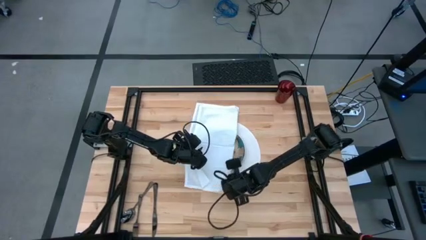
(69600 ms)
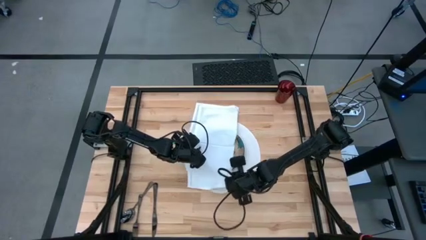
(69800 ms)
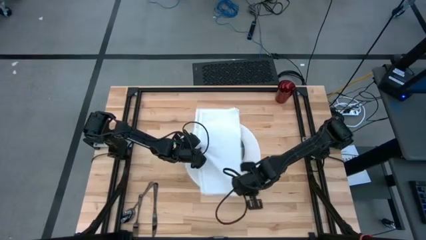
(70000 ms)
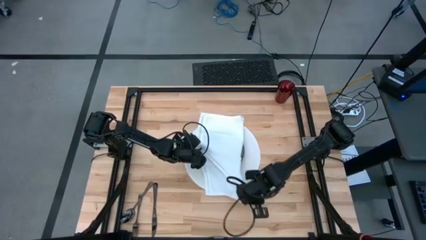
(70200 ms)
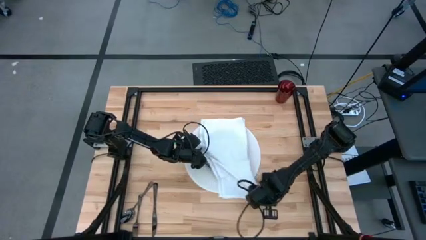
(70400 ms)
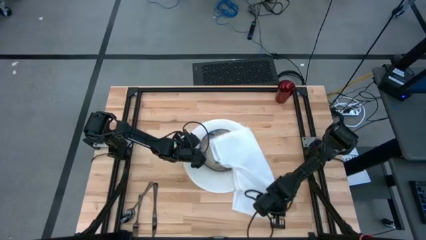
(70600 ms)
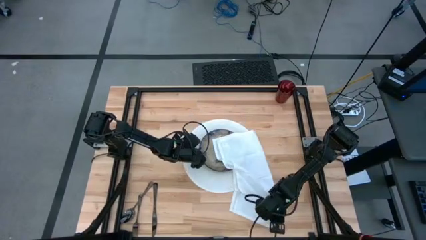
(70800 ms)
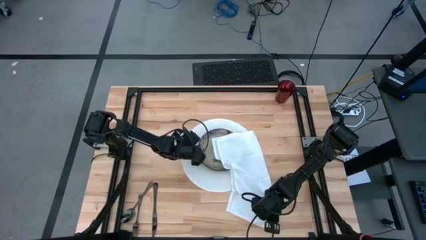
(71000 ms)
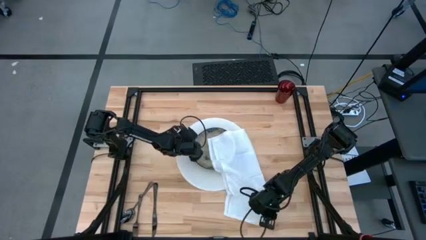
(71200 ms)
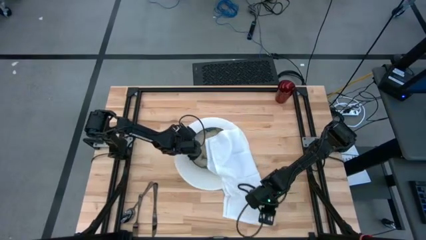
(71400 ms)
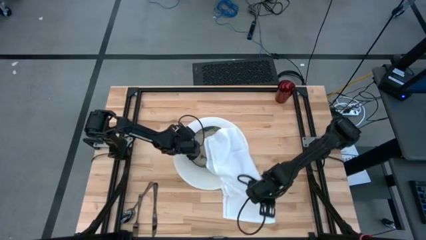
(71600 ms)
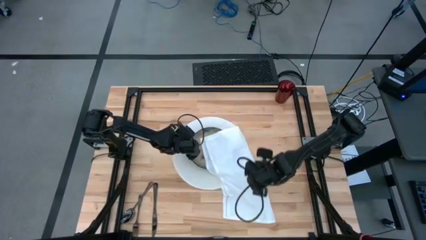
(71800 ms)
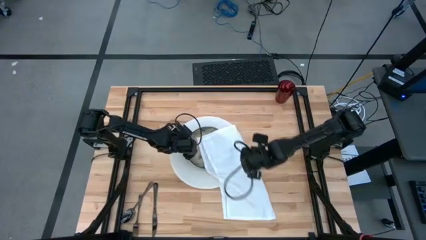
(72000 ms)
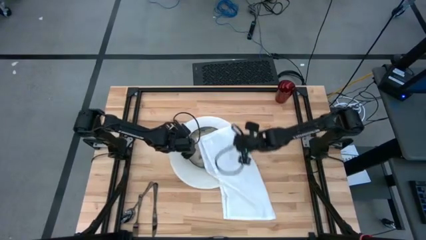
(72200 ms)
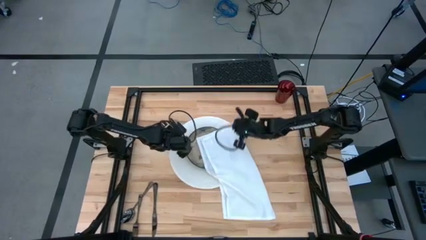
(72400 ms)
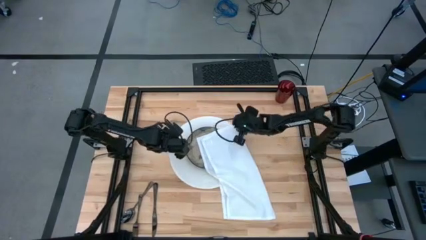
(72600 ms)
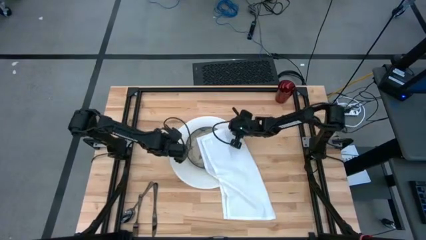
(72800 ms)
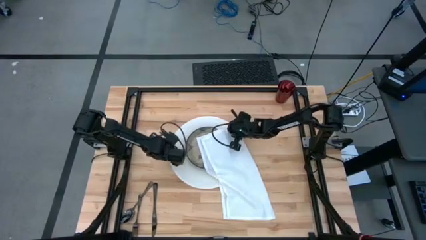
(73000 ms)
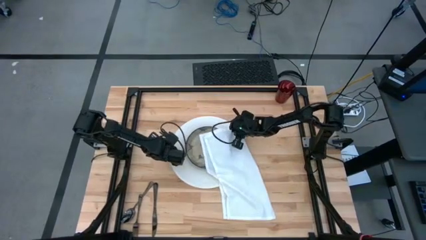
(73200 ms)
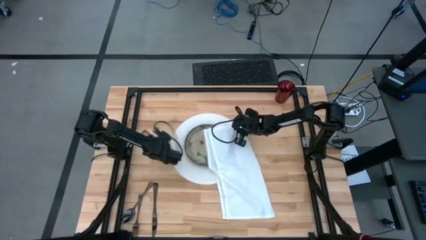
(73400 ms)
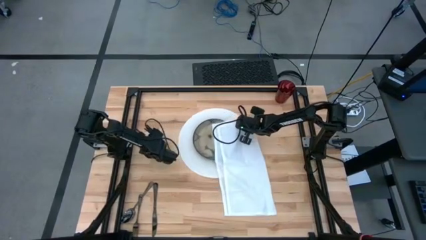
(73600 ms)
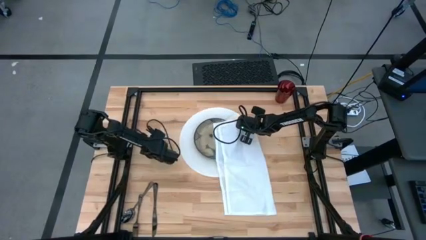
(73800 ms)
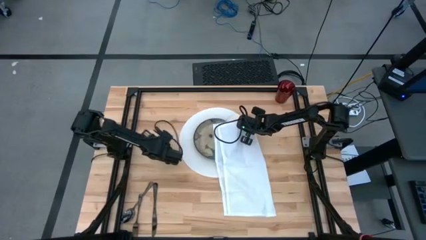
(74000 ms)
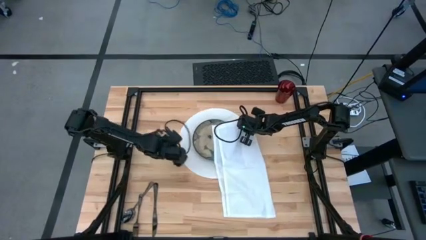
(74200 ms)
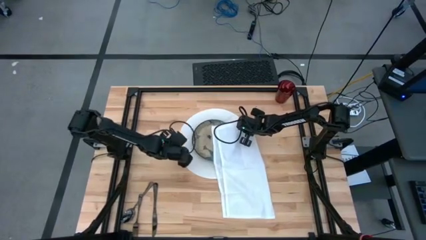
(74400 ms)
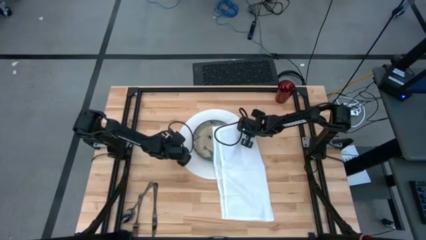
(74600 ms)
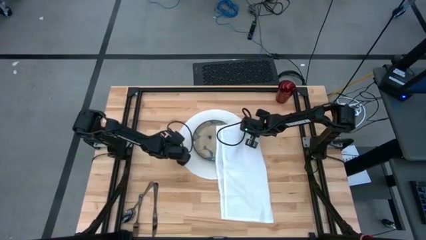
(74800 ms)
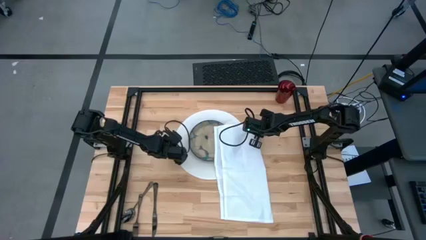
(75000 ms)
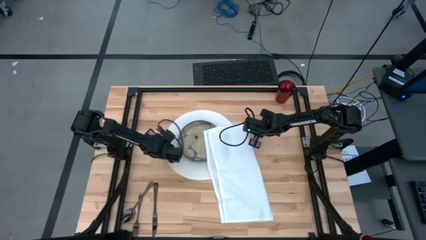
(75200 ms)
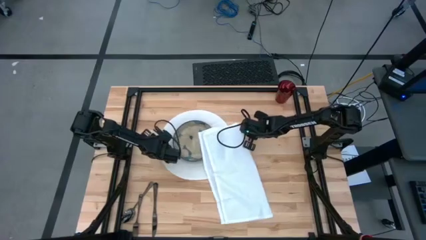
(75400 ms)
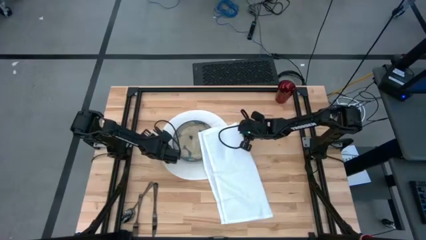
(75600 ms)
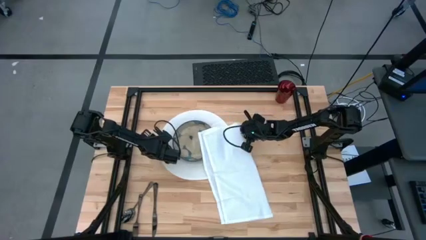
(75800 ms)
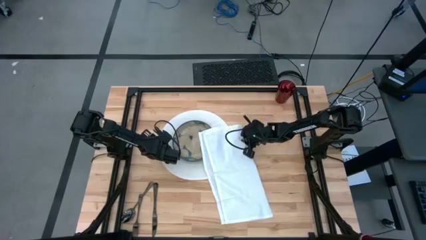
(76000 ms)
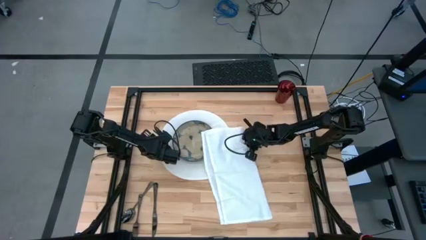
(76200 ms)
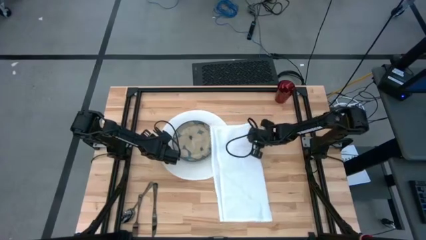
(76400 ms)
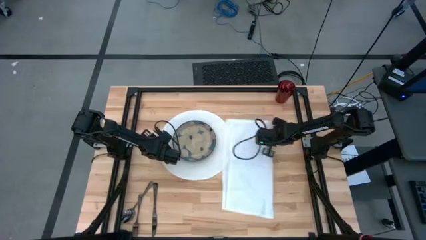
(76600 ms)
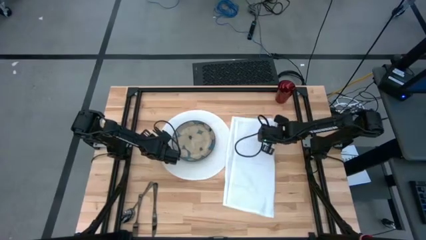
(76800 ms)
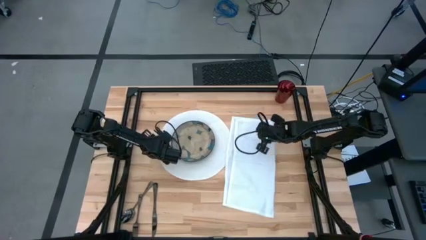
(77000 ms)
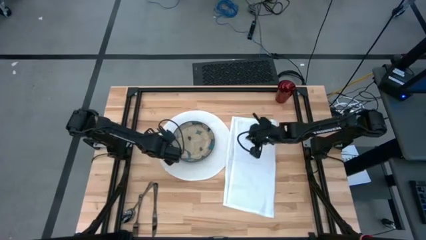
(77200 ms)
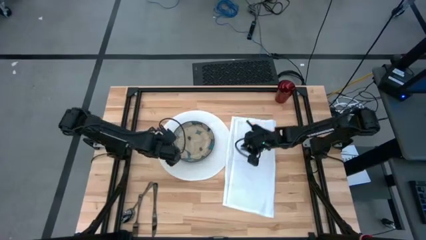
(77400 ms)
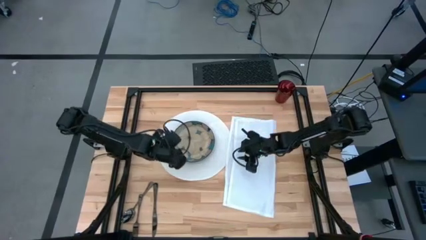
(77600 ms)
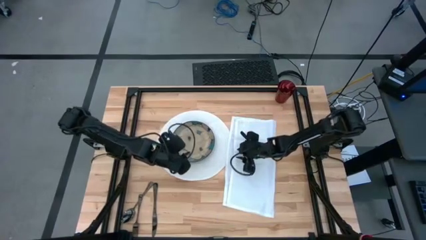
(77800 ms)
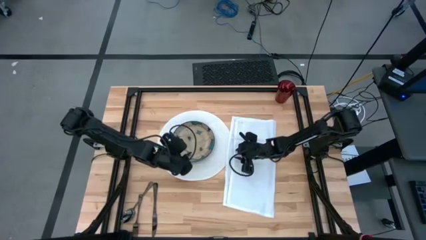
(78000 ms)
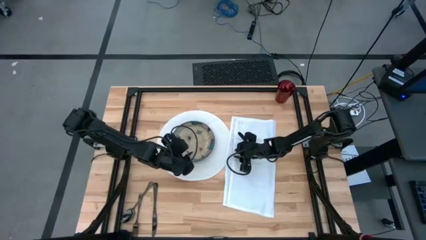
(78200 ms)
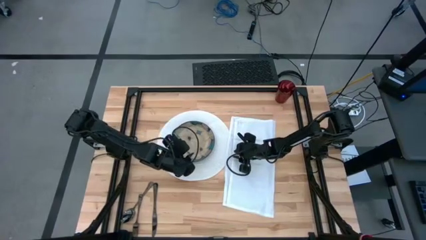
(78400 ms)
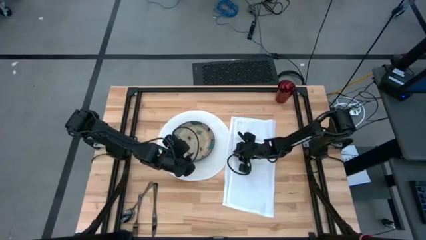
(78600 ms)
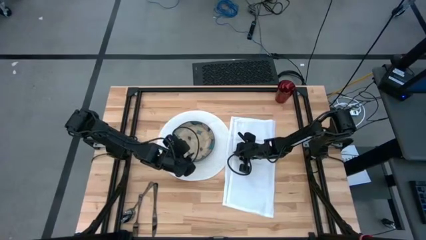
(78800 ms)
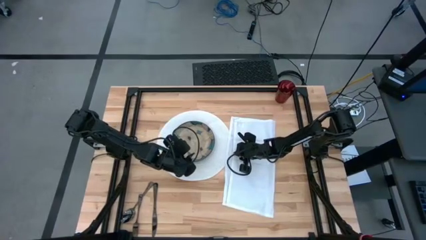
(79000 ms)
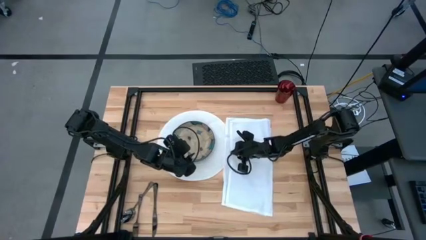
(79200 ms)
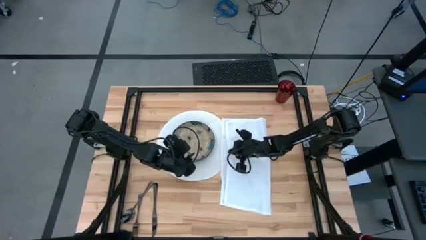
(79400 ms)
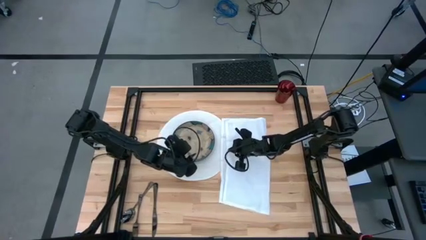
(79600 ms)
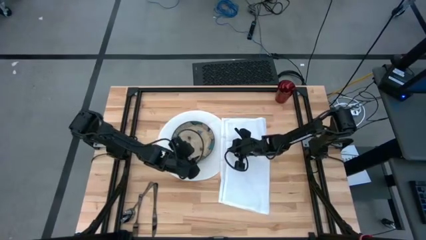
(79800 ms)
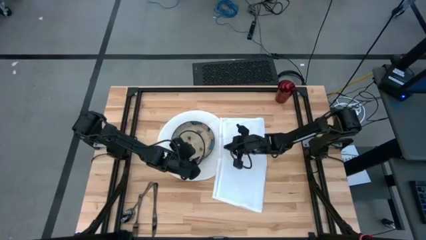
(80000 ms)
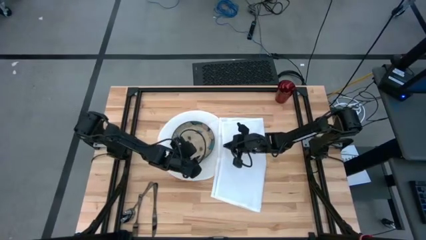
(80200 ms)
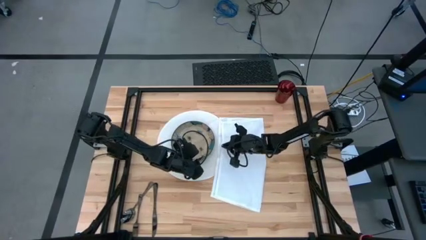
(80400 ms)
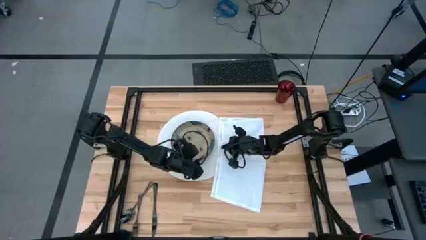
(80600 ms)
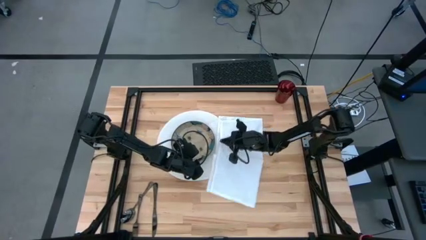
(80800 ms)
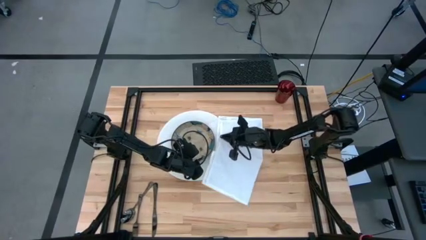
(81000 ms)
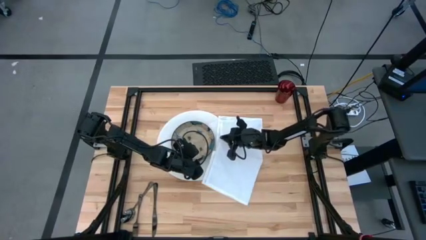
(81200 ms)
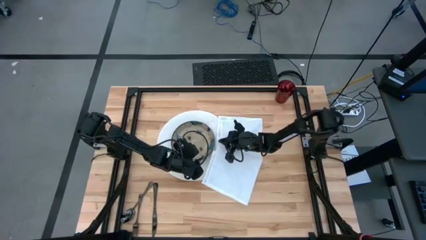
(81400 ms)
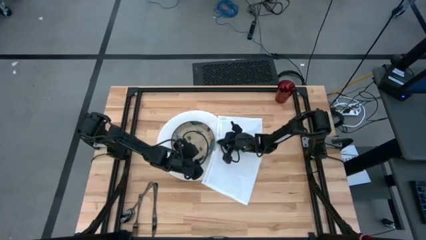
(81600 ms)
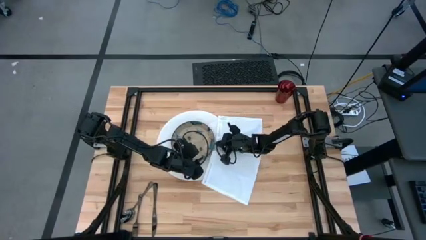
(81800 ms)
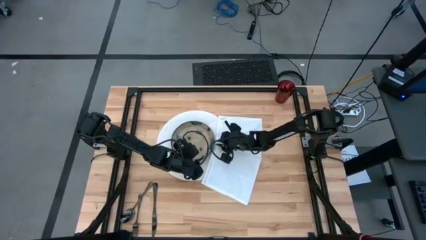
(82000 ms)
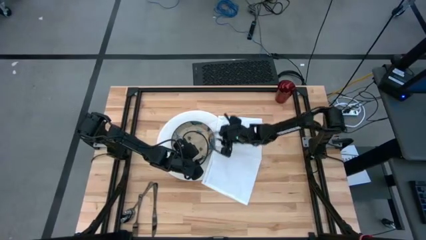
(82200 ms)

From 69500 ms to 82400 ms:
Task: Set table place
Fold the white napkin

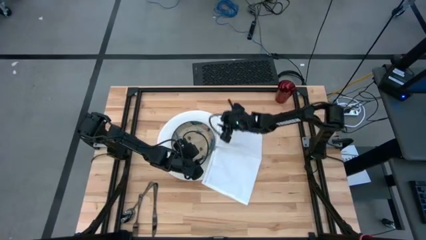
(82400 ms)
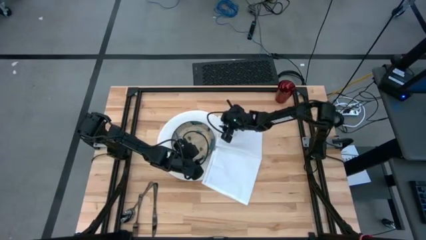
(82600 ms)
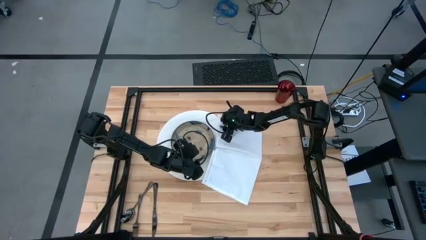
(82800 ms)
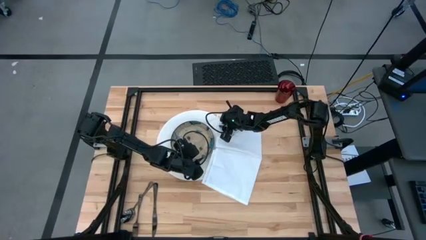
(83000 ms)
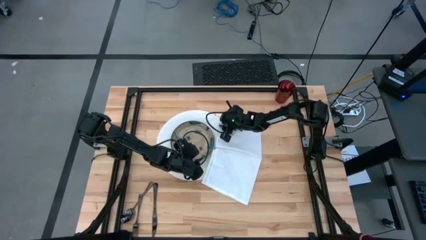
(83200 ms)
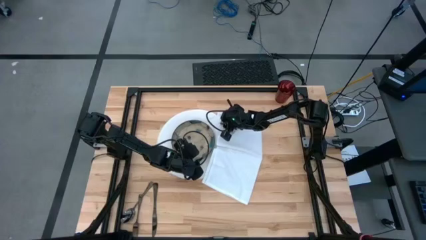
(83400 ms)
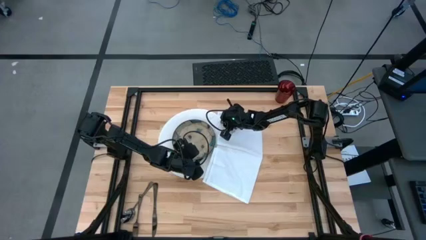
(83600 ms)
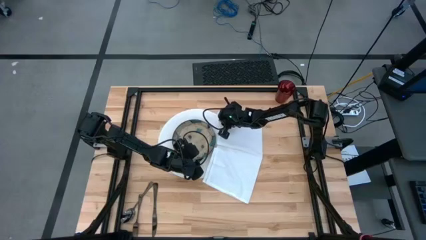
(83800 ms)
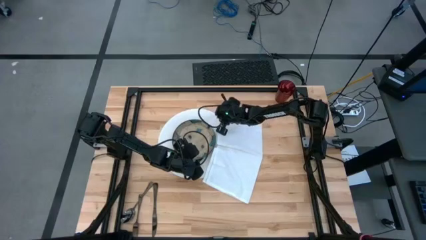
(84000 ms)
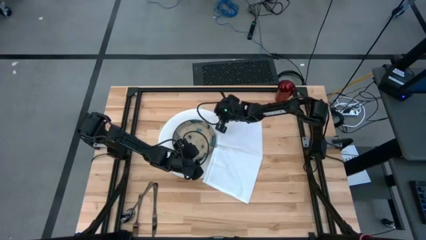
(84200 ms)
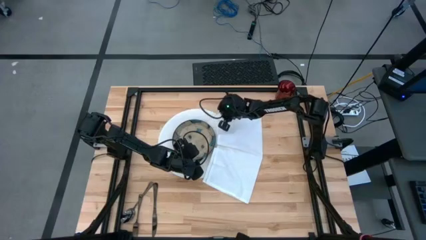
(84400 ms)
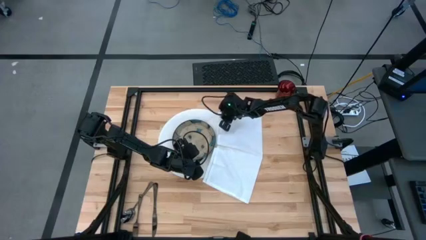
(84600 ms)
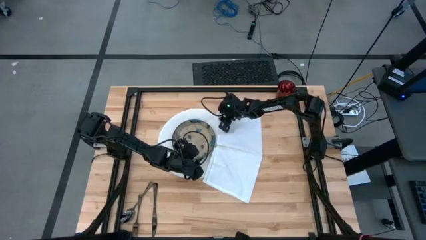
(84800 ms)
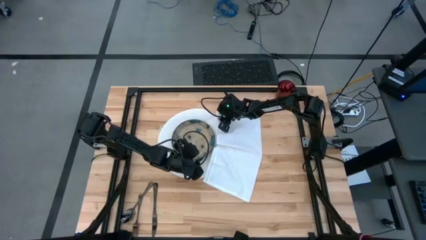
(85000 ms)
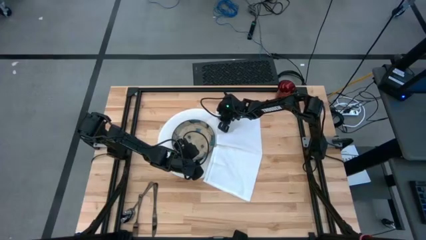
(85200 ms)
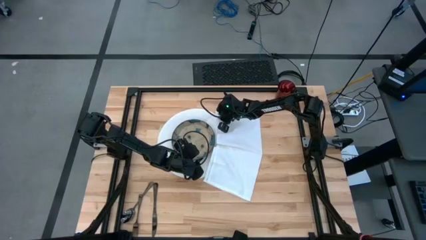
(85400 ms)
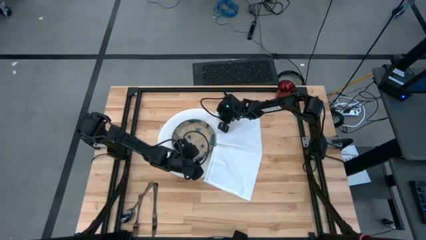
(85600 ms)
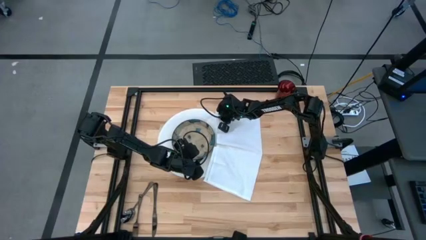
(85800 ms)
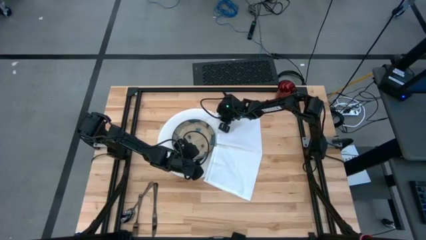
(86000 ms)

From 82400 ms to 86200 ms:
Fold the white napkin

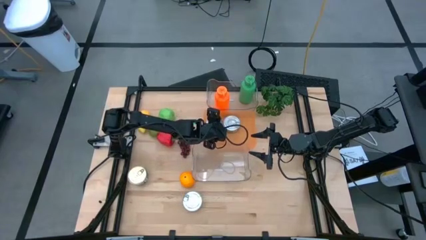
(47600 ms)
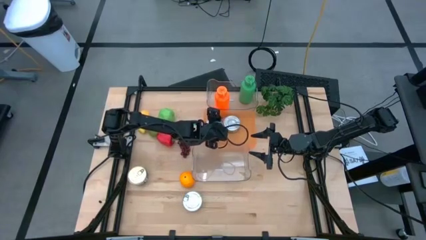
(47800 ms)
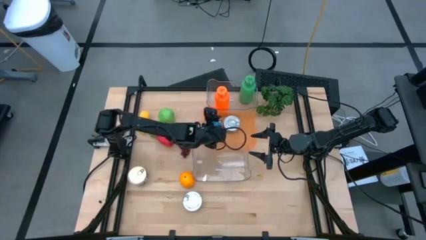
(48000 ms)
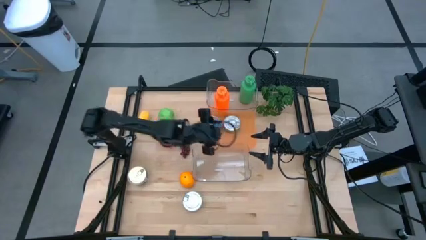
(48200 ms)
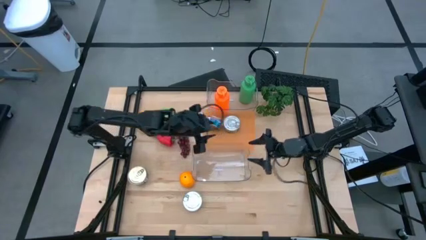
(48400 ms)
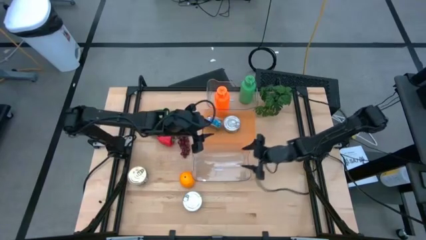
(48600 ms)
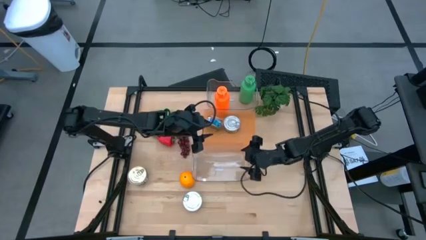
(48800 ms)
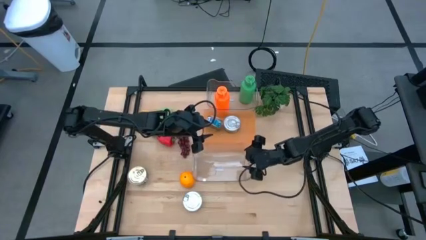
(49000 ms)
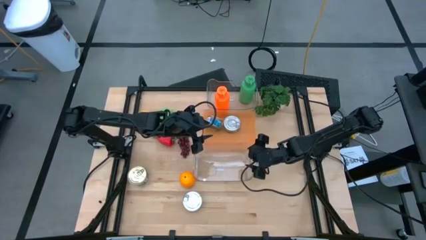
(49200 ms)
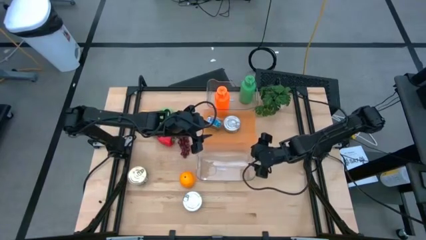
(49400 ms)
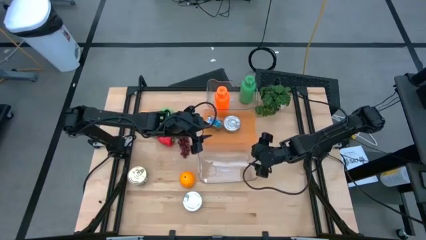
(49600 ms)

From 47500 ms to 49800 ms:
Task: Pick & Place Food Item
Adjust the bottom transparent bin
